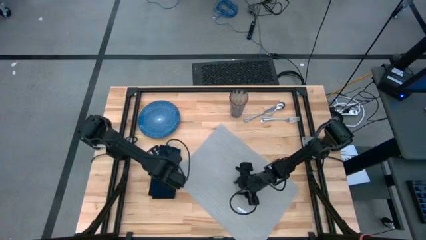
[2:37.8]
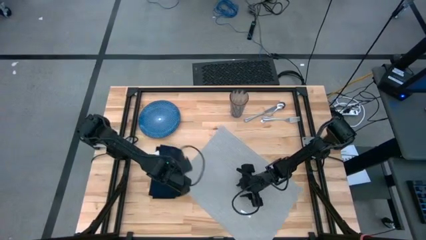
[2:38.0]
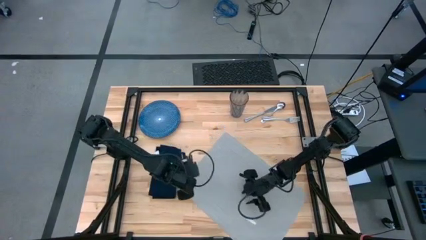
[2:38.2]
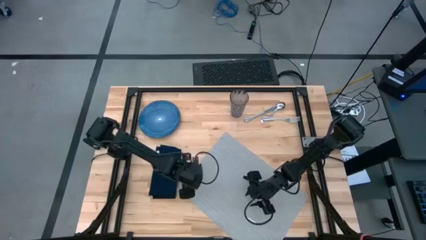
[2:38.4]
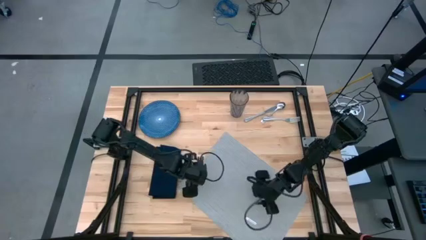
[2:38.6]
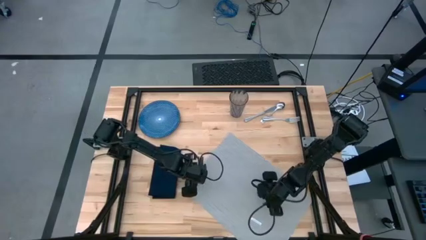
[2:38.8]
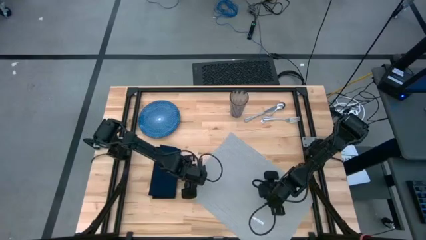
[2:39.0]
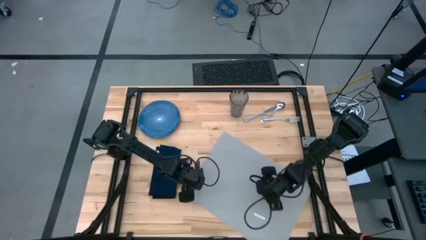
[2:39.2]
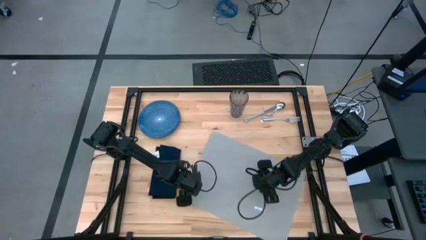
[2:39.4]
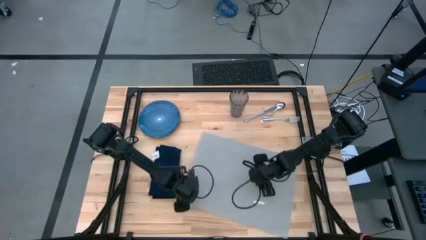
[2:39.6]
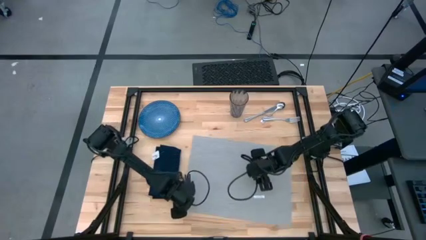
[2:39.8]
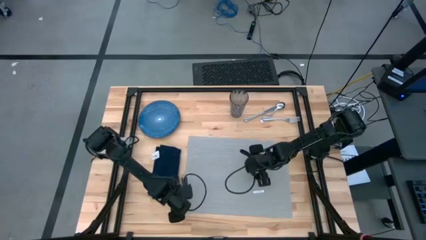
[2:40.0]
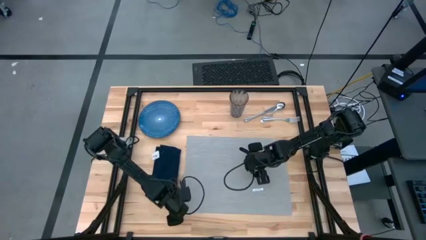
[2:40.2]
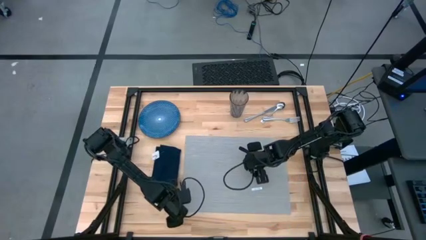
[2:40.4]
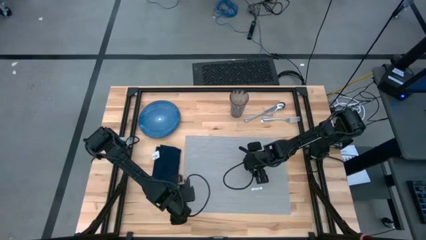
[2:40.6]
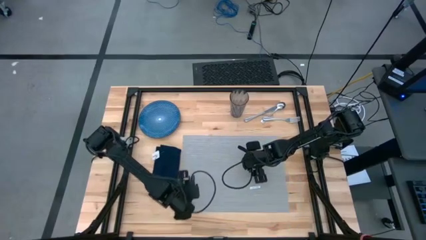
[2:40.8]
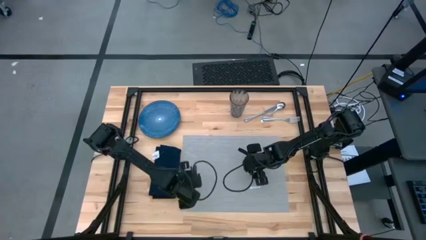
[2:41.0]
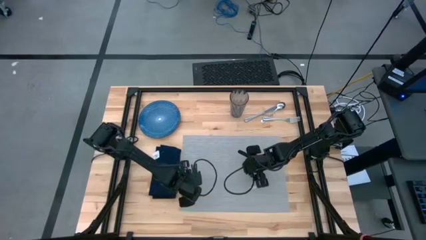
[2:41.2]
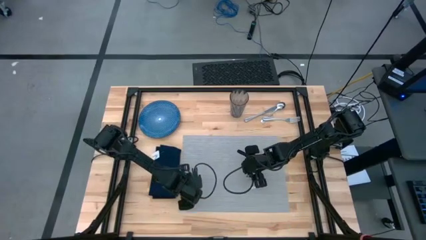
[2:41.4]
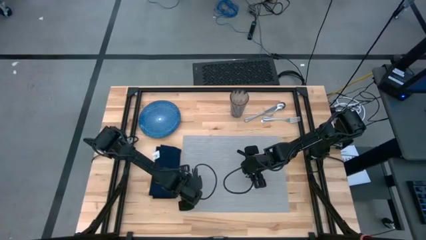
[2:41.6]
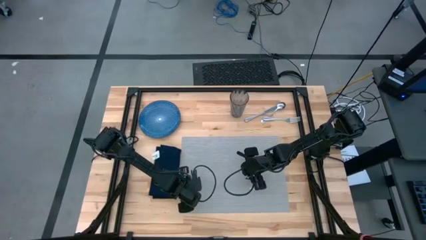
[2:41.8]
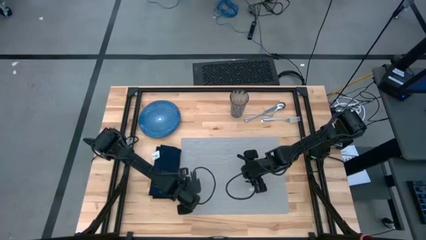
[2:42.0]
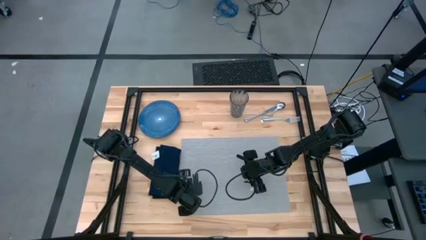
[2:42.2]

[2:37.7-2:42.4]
Task: Set table place
Adjust the gray placemat

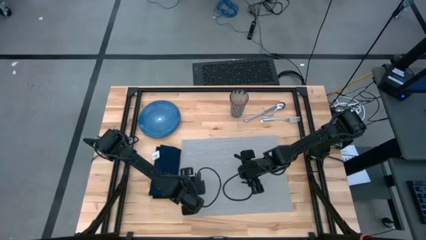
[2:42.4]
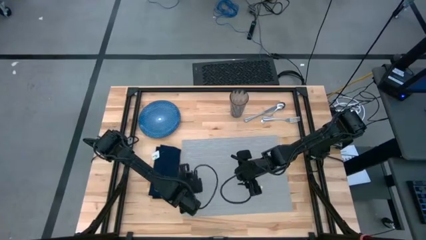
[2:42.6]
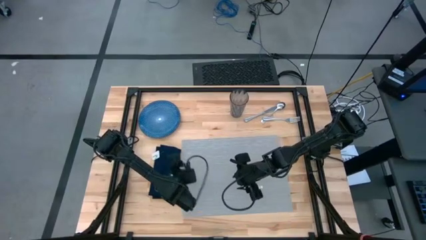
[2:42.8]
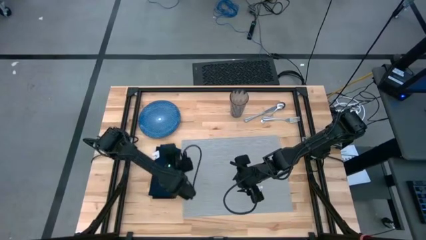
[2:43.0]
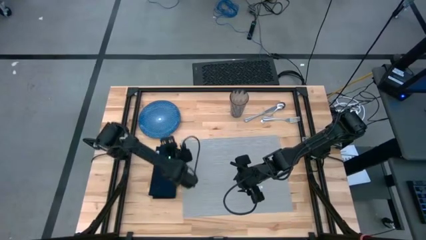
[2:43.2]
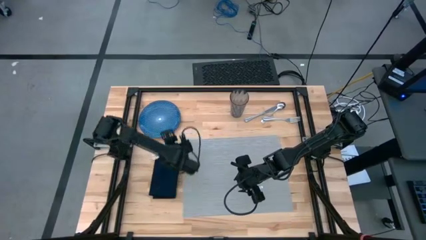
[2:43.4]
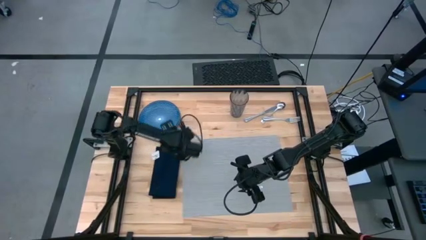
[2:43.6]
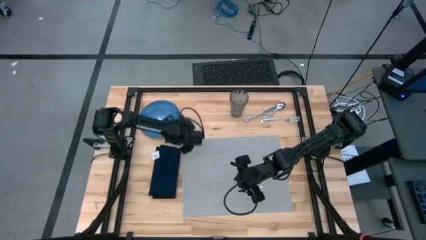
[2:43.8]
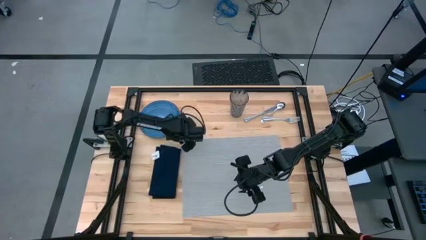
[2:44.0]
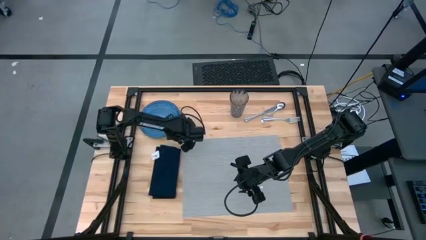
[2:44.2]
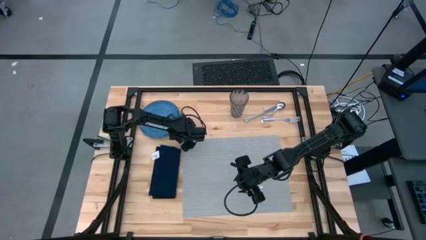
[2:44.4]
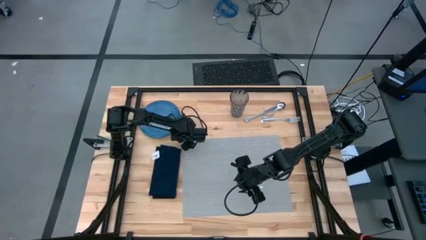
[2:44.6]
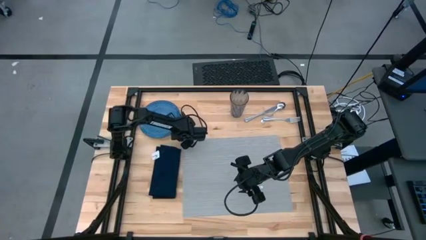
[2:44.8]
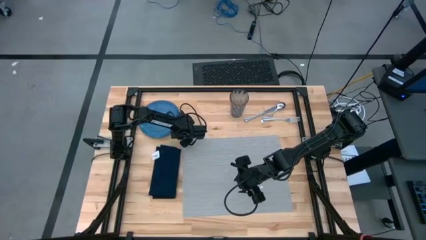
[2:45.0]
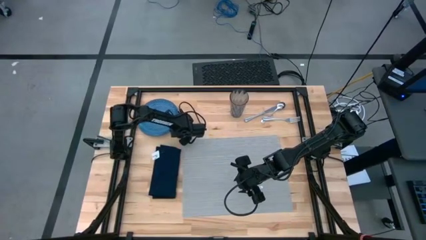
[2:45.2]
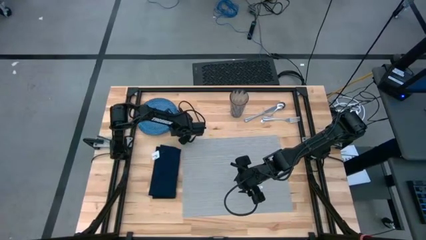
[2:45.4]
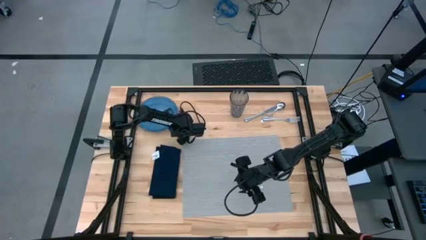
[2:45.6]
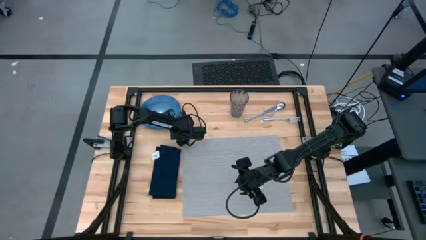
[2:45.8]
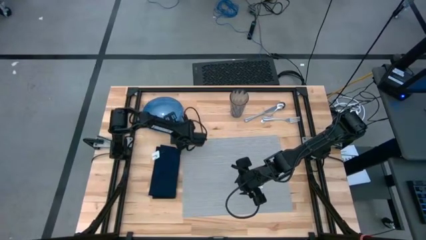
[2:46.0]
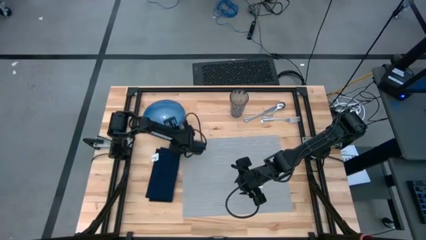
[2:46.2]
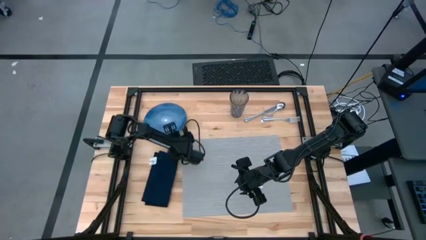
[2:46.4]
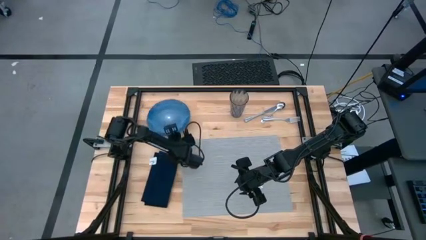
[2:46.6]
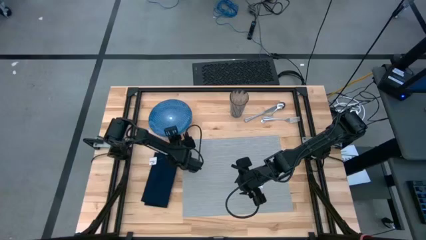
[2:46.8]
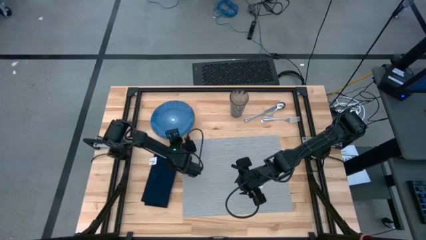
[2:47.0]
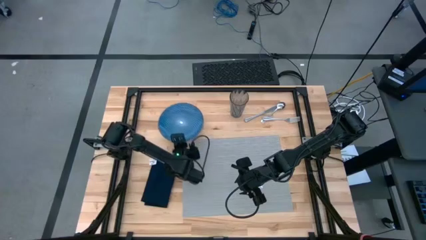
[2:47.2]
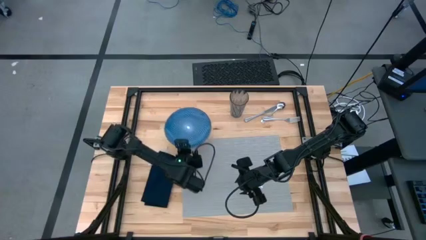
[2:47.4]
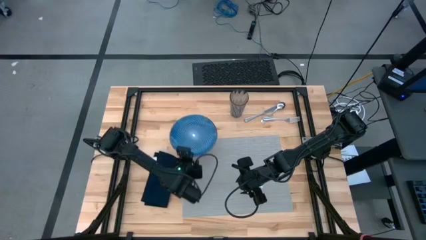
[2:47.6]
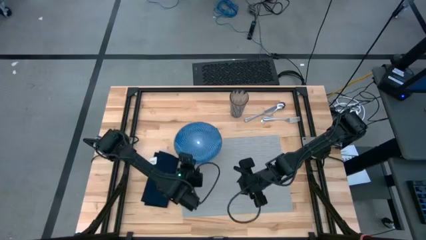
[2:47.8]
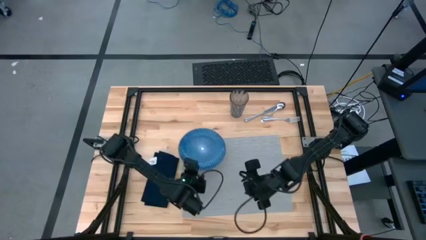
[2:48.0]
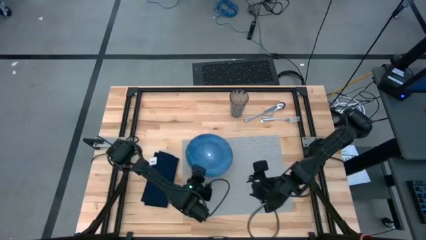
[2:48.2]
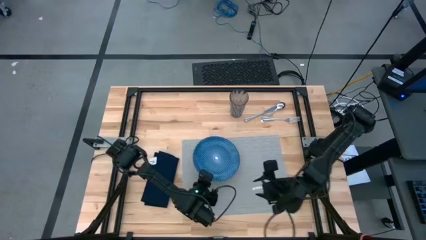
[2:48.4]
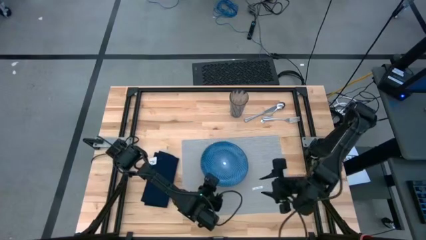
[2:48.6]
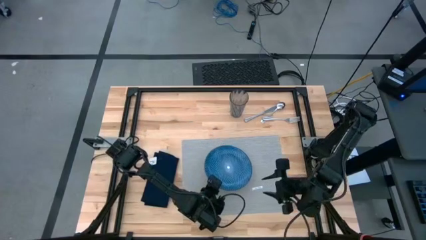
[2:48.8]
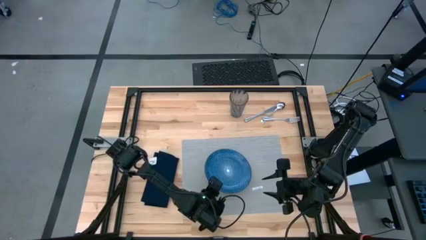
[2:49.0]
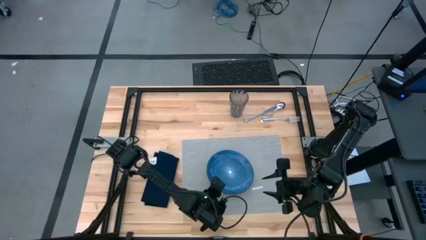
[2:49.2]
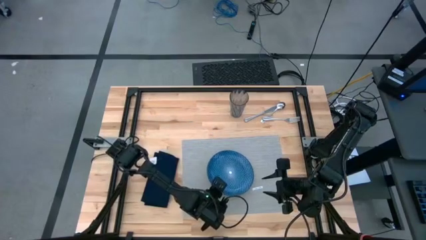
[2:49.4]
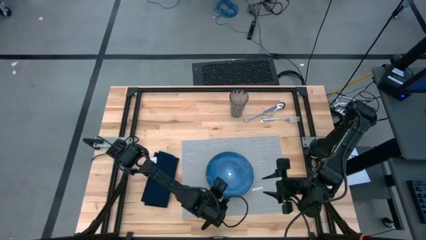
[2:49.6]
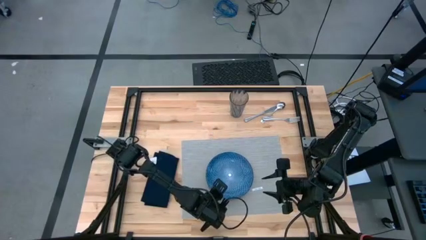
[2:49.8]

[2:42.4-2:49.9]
Put the blue plate on the gray placemat

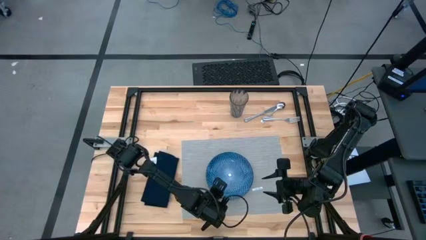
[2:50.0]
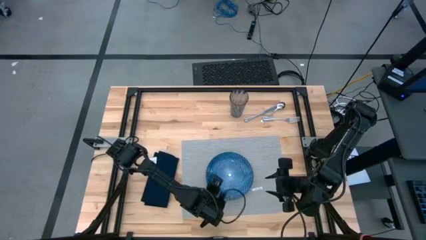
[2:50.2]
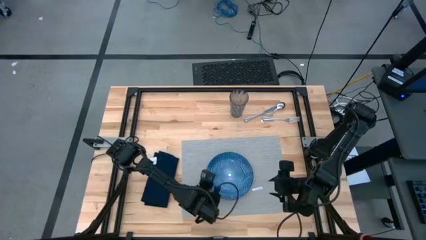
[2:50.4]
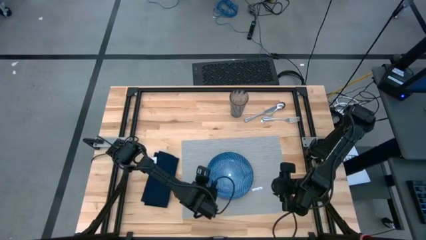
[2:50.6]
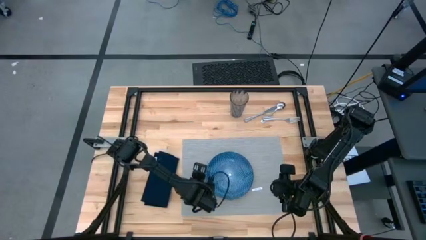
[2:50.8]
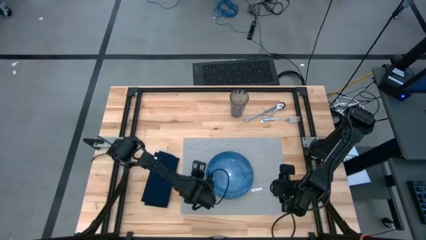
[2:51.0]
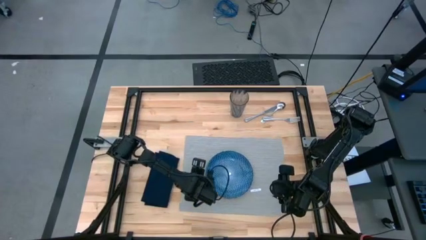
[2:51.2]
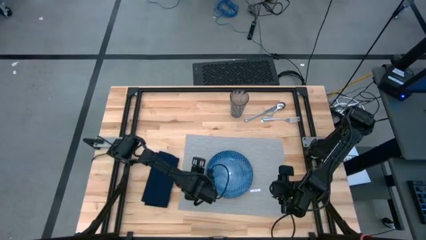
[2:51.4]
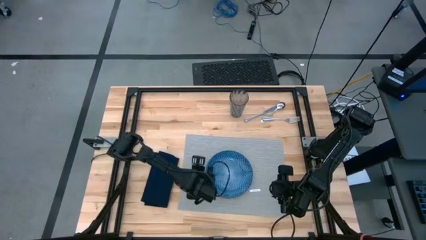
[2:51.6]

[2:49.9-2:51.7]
Adjust the gray placemat

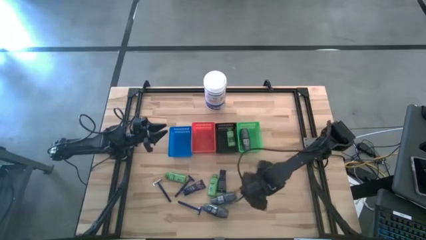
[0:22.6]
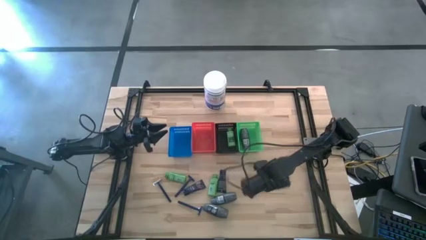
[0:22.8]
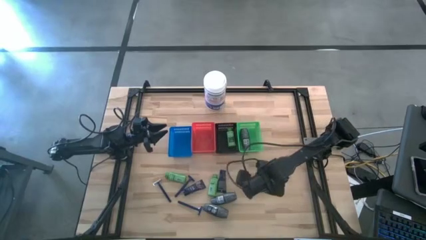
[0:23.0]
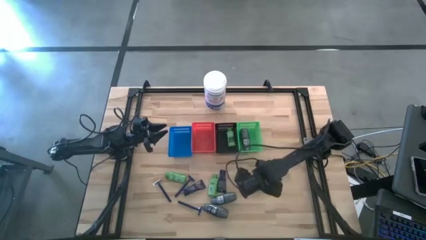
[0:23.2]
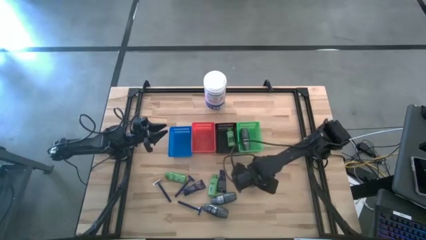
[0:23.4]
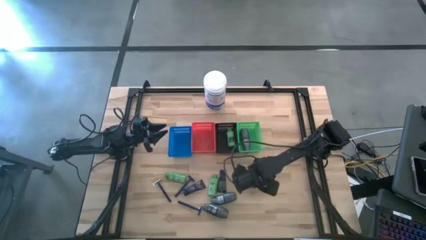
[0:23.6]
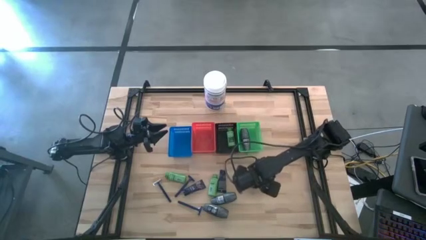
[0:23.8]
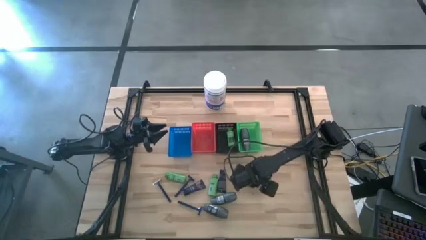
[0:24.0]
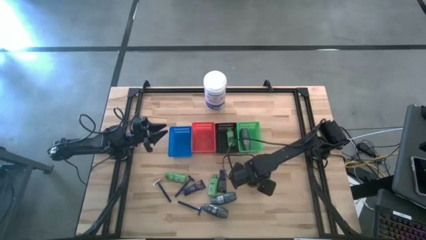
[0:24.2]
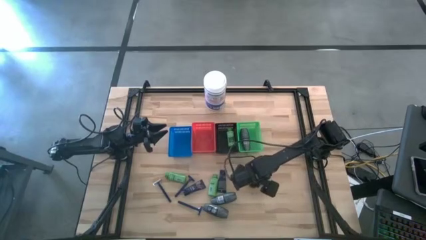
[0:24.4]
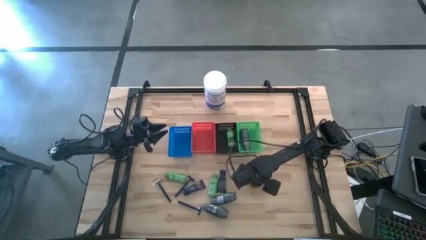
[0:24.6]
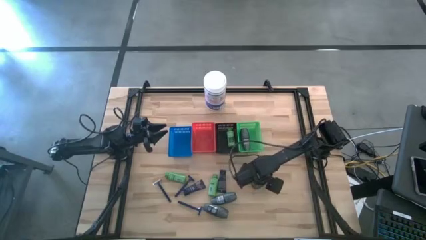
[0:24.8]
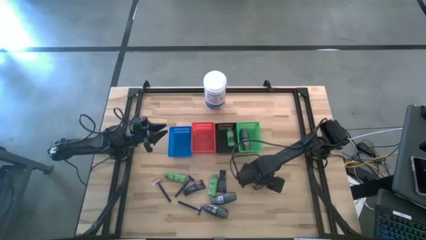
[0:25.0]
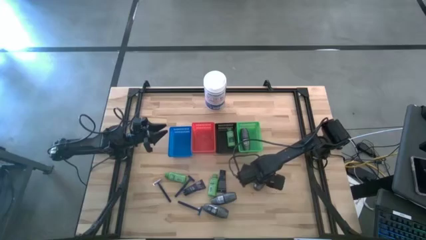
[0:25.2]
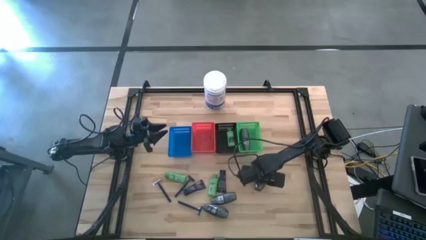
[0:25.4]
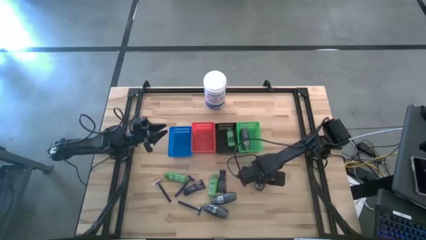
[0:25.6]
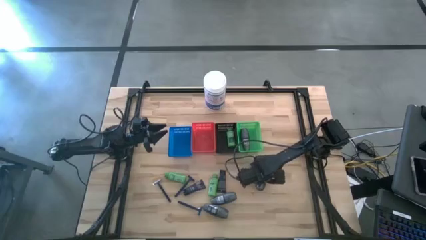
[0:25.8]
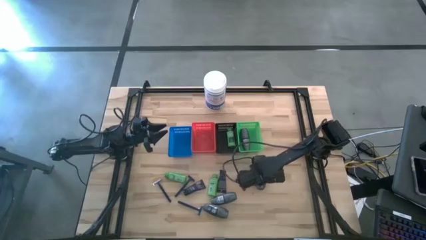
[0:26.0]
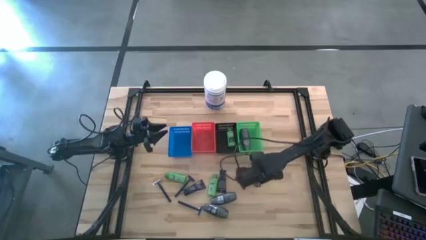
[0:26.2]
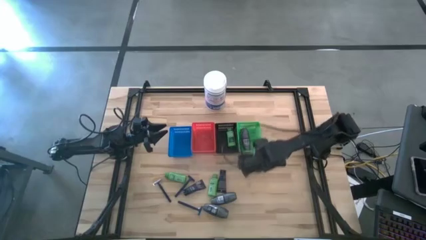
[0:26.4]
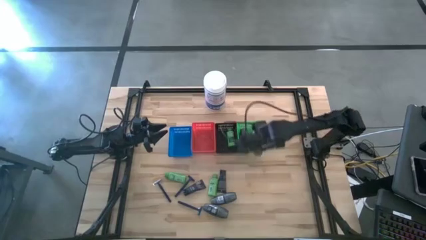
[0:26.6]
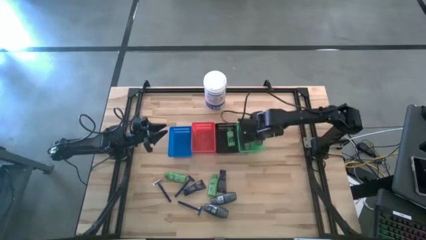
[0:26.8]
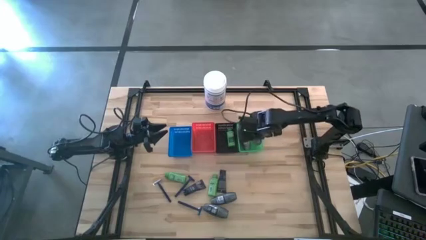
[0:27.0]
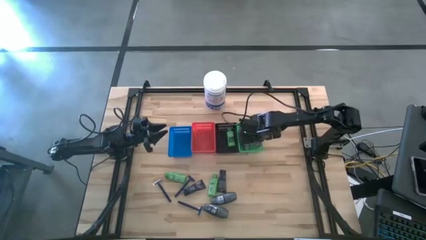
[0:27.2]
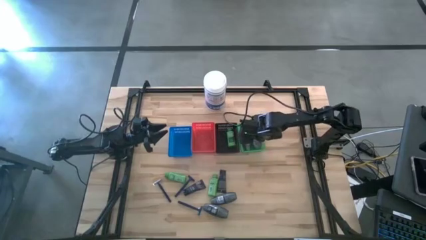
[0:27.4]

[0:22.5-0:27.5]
Task: Pick & Place Travel size toiletries
Put the deodorant into the green basket
